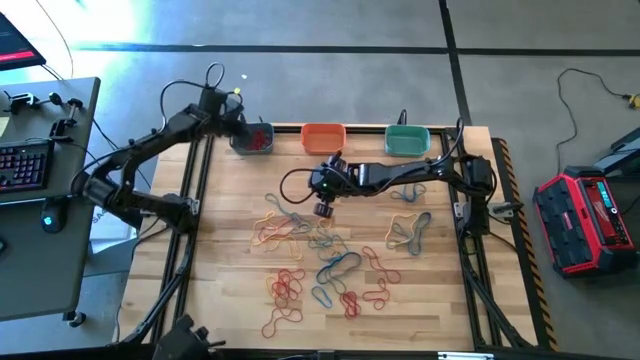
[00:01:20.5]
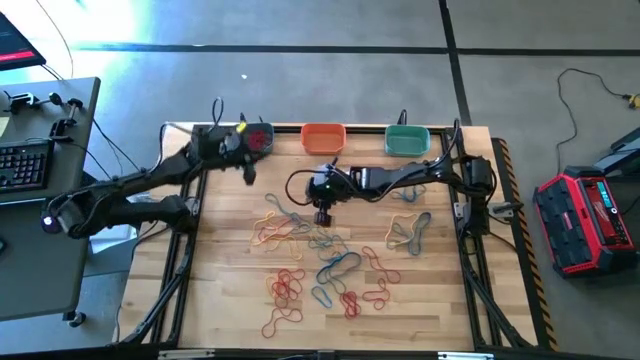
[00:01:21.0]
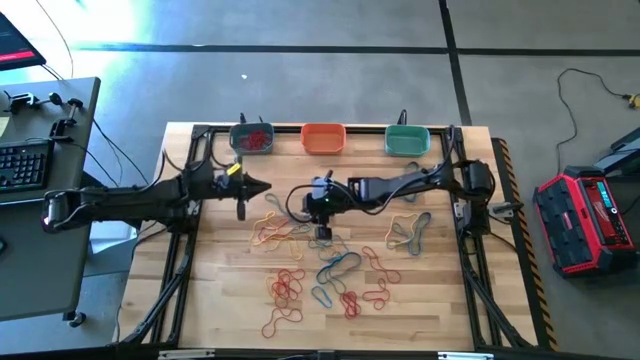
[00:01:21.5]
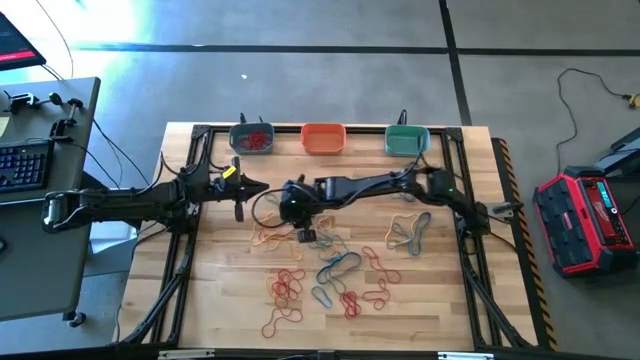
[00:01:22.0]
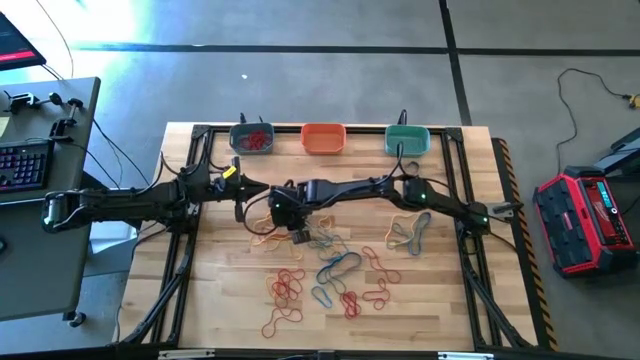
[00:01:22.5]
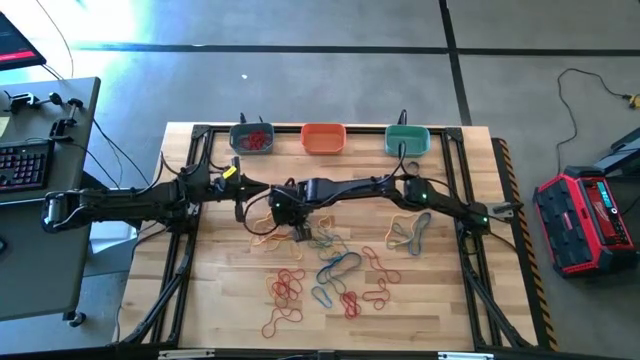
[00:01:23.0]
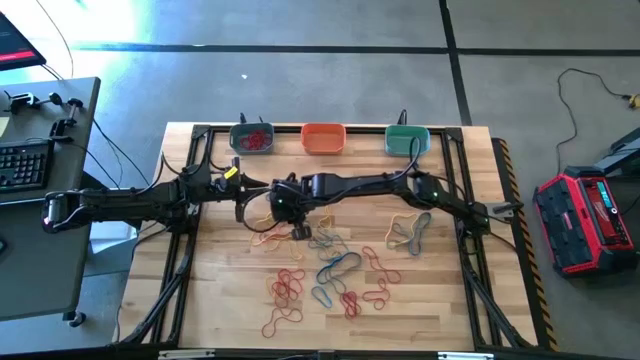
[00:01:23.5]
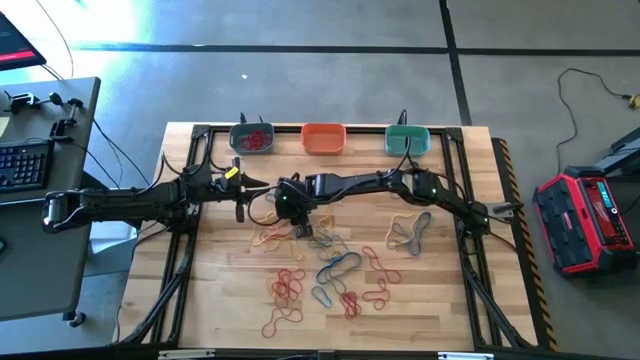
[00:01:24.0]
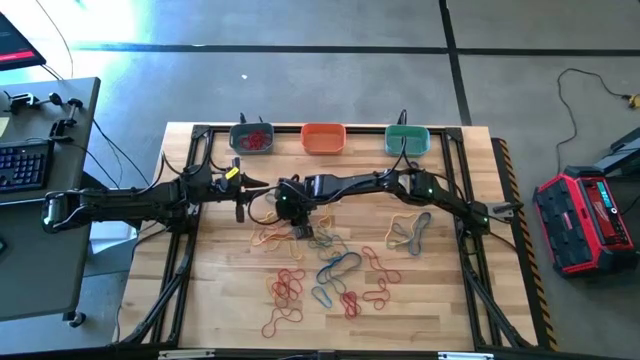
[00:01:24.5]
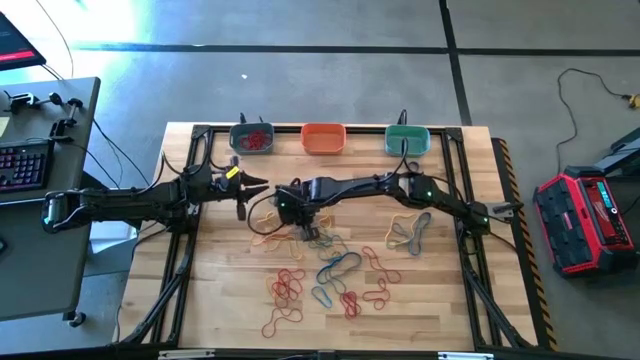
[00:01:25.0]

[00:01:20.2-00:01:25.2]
Task: Sort rubber bands into baskets
Put the red rubber band into the blue bin

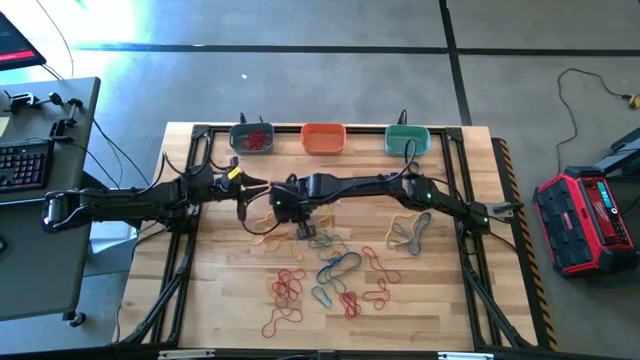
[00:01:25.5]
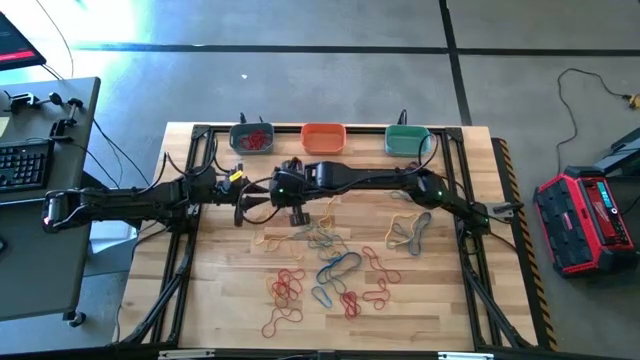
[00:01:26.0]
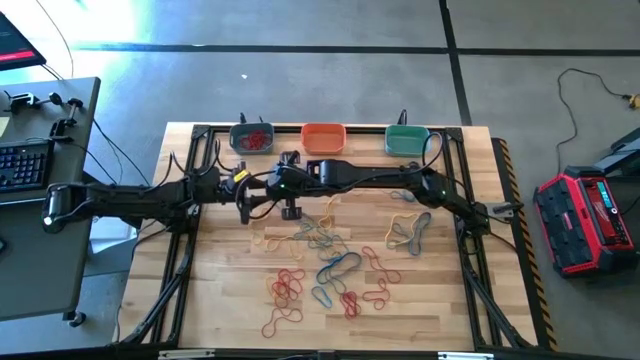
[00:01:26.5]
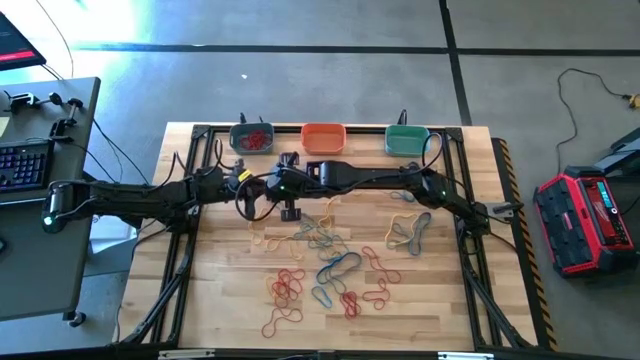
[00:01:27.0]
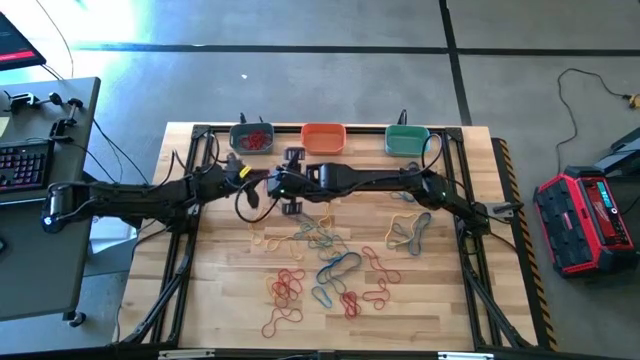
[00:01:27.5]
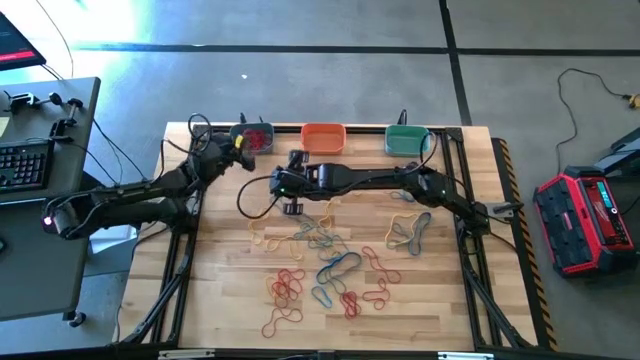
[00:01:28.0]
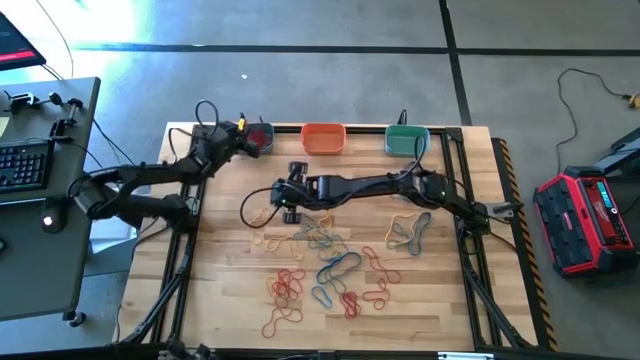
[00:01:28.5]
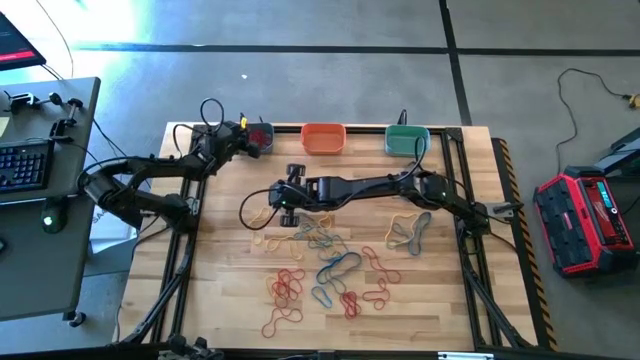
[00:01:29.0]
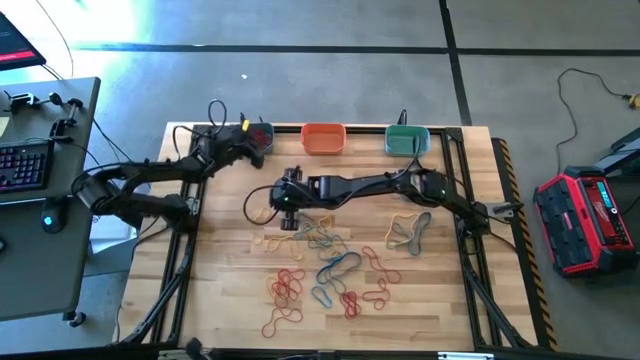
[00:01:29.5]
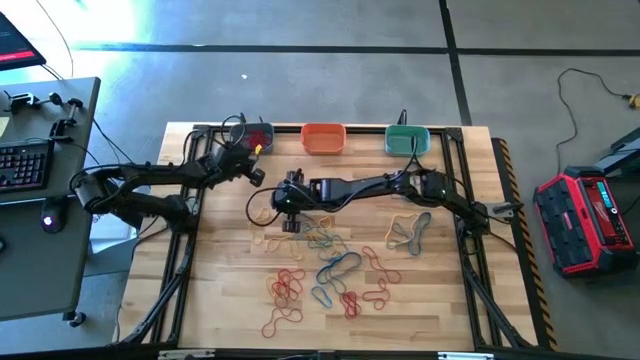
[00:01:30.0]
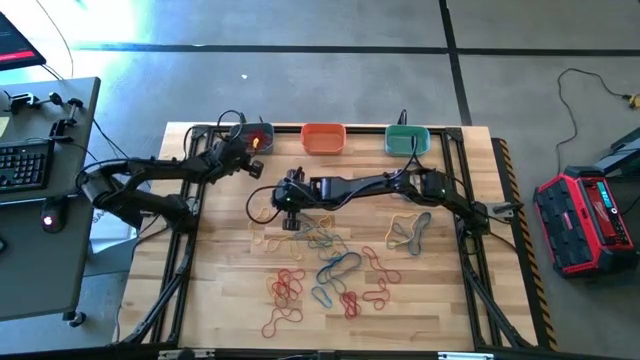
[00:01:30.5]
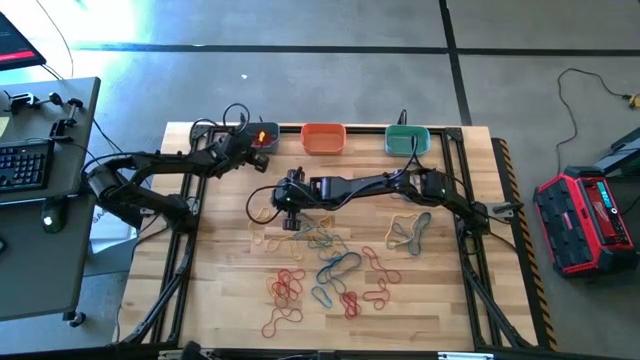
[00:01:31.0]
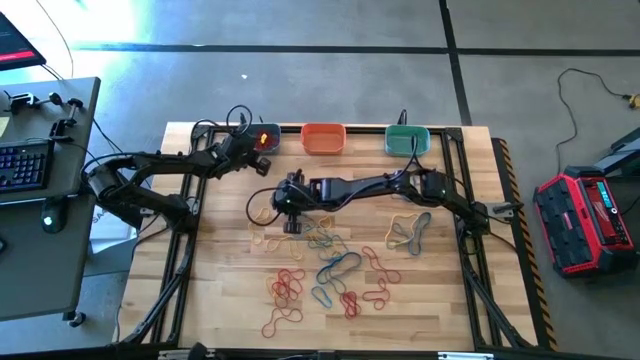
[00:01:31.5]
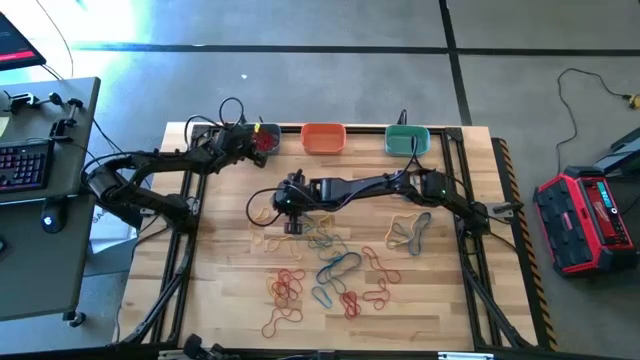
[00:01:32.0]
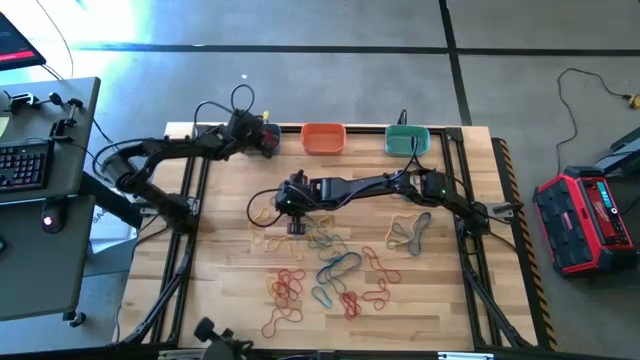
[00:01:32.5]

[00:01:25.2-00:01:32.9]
Put the red rubber band into the blue bin

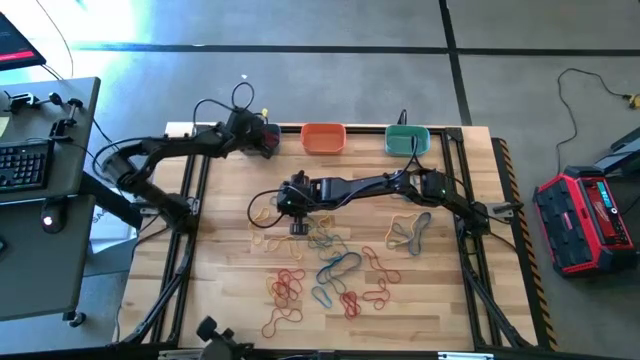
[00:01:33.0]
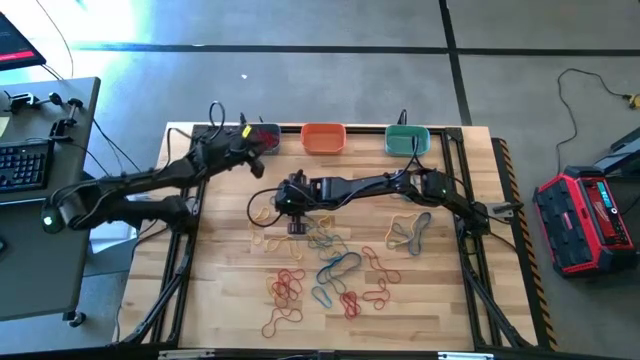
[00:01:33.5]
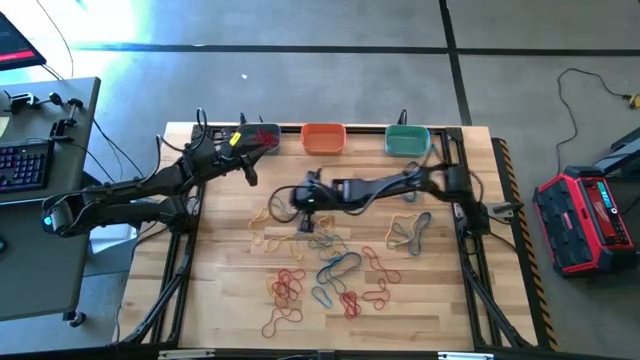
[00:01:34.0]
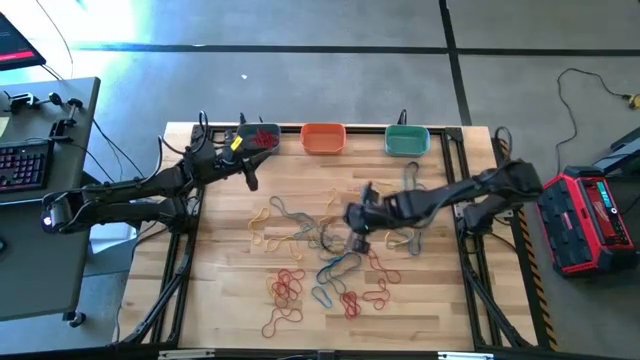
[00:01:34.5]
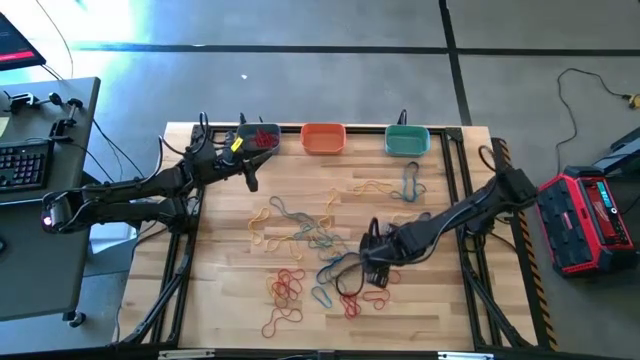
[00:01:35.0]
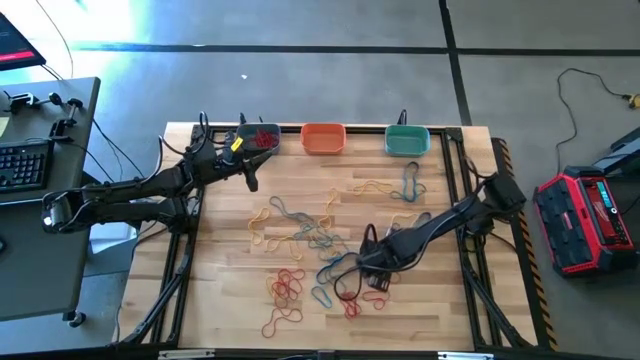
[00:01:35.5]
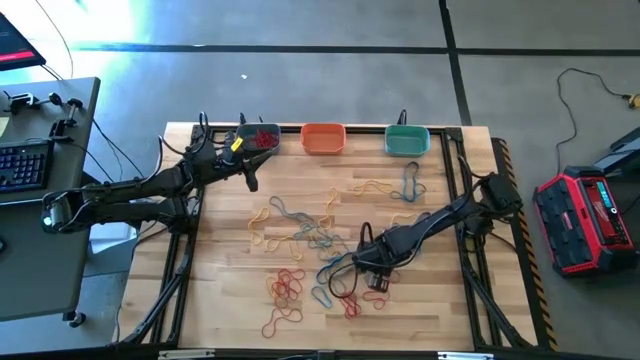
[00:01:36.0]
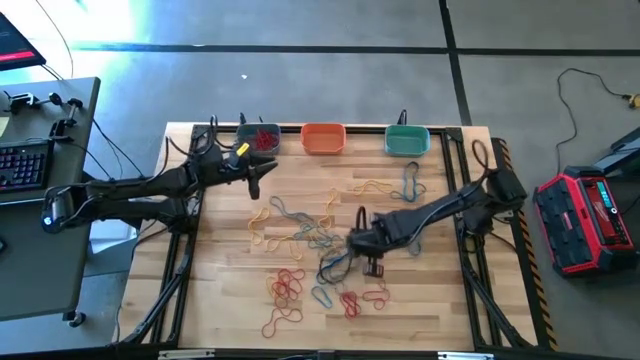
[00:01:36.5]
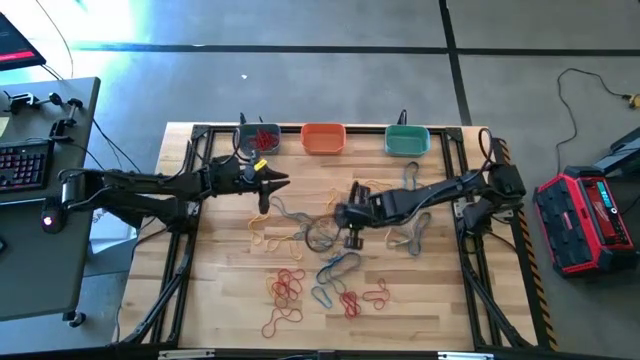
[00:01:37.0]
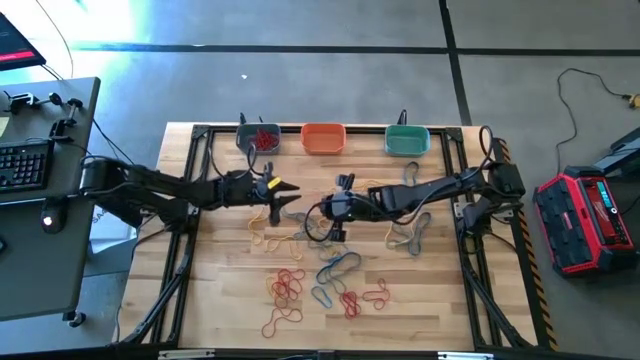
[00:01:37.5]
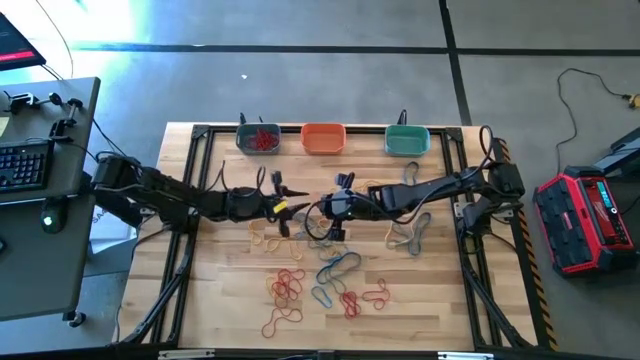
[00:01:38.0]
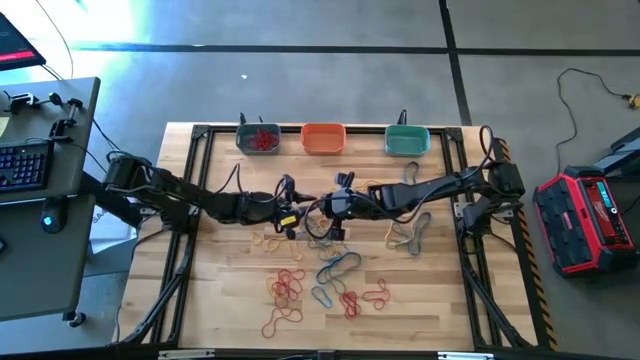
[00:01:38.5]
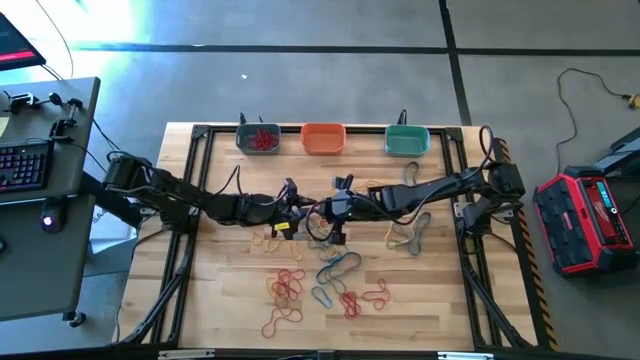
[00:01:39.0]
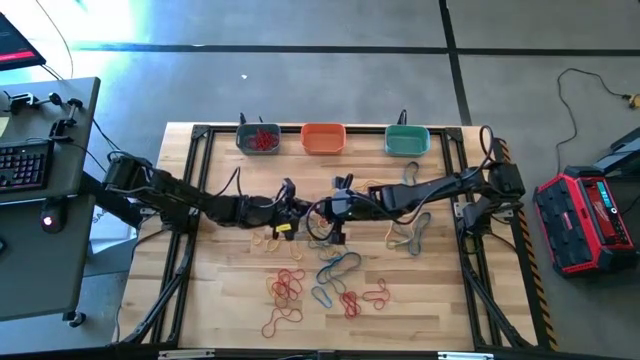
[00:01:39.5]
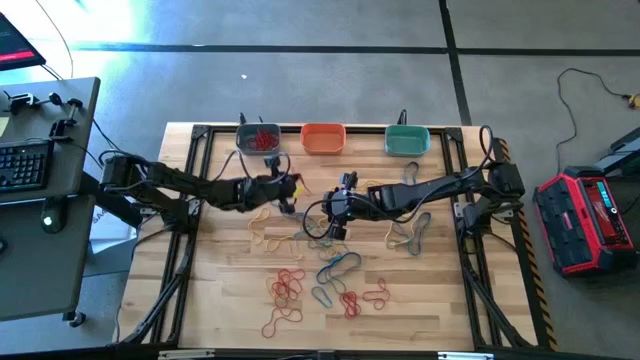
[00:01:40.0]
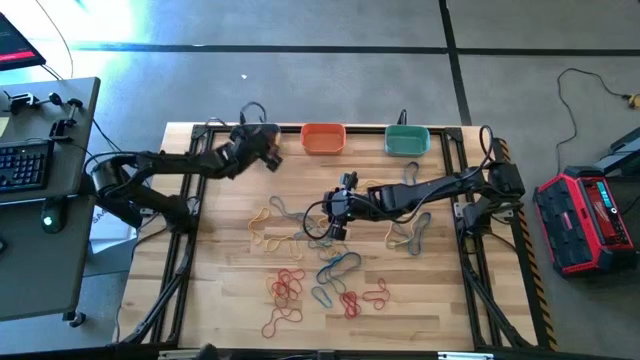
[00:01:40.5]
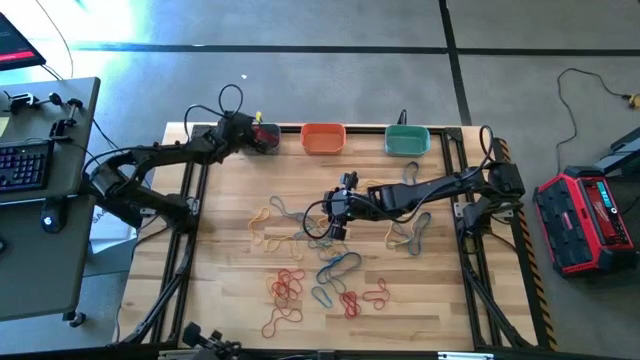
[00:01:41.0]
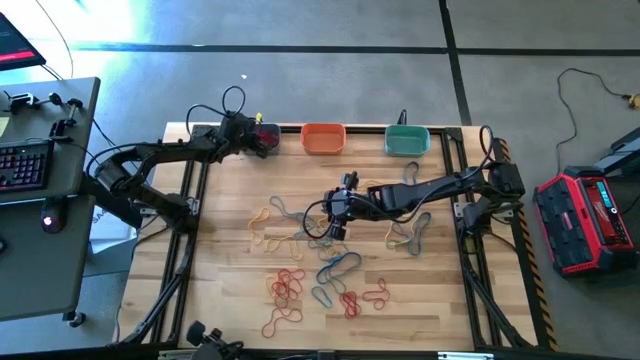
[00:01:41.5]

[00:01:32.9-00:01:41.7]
Put the red rubber band into the blue bin
